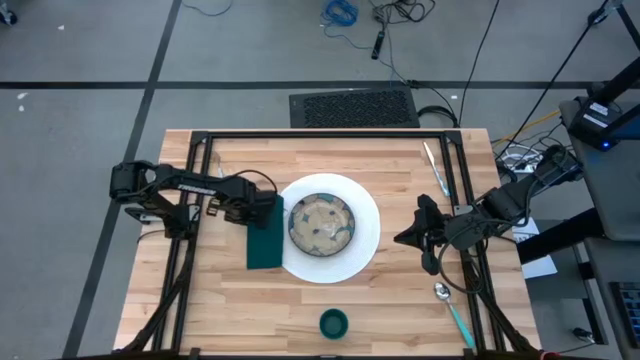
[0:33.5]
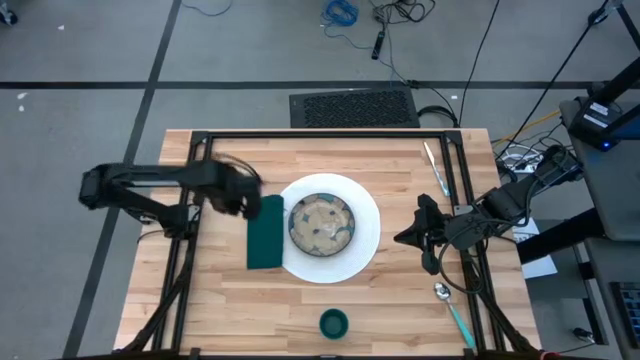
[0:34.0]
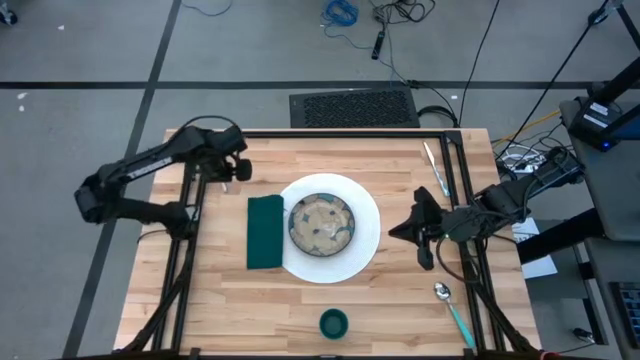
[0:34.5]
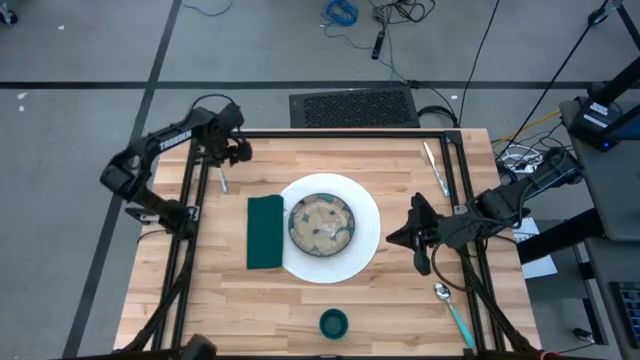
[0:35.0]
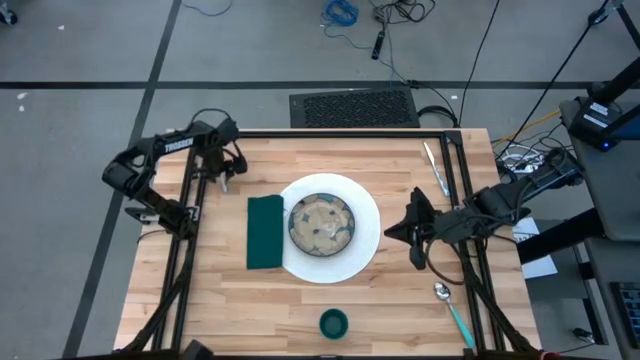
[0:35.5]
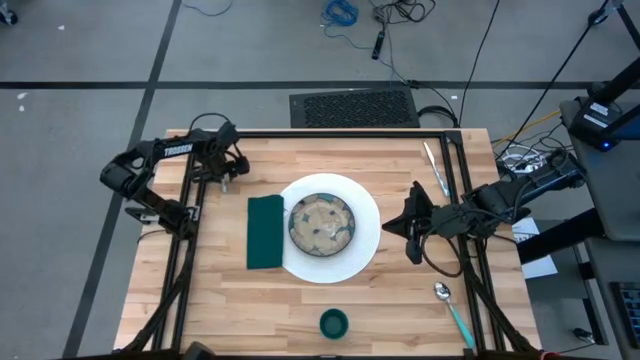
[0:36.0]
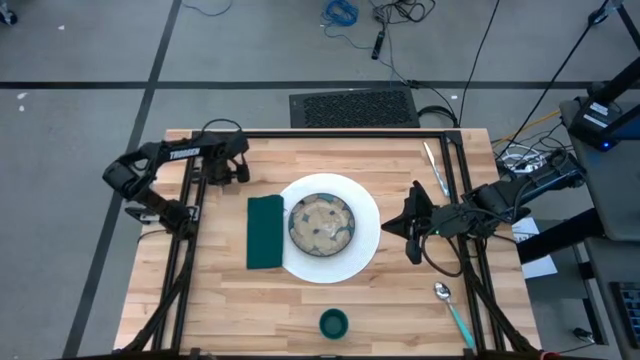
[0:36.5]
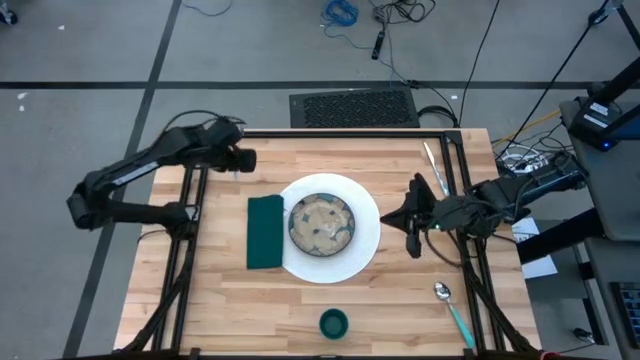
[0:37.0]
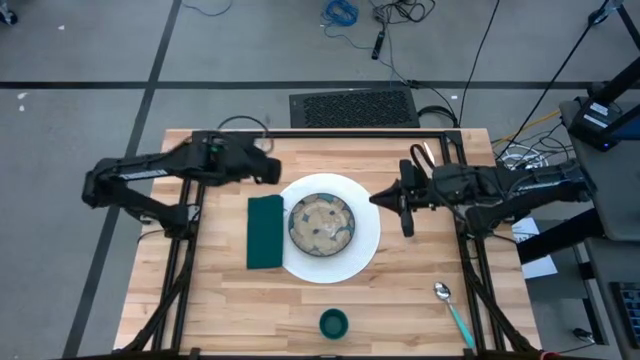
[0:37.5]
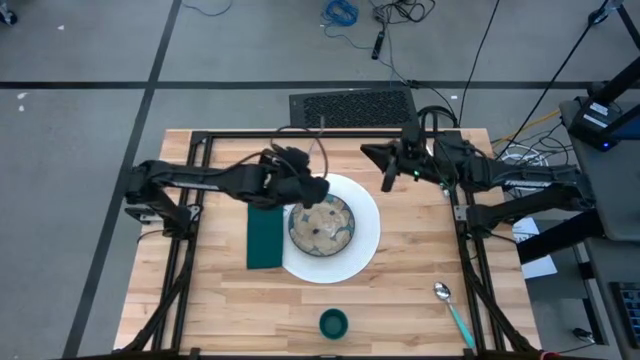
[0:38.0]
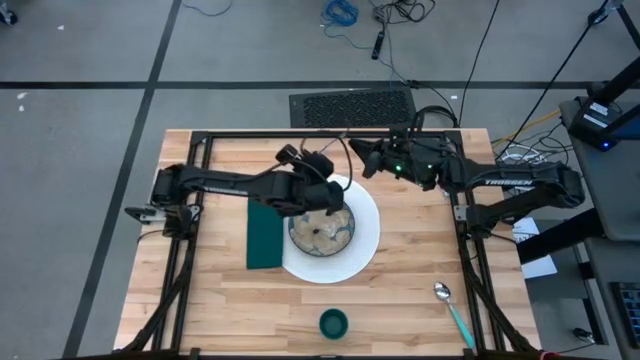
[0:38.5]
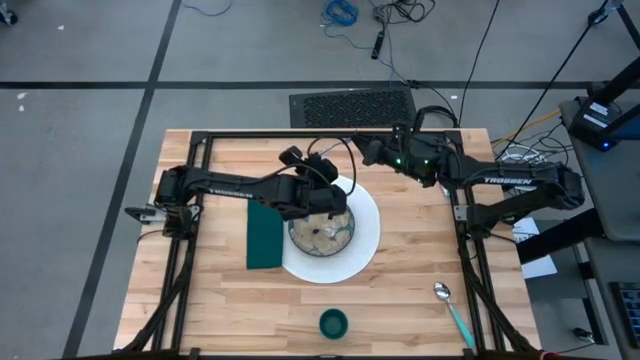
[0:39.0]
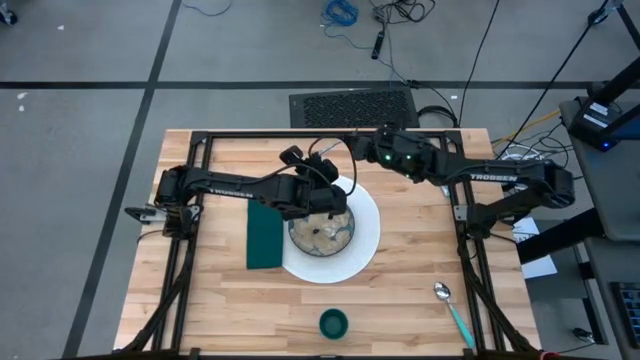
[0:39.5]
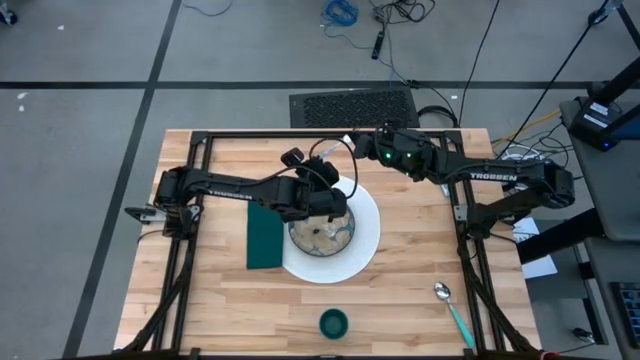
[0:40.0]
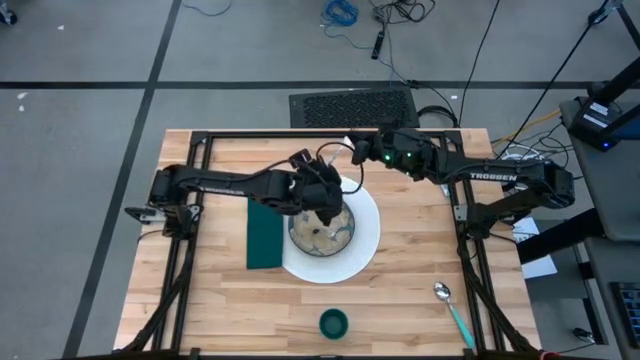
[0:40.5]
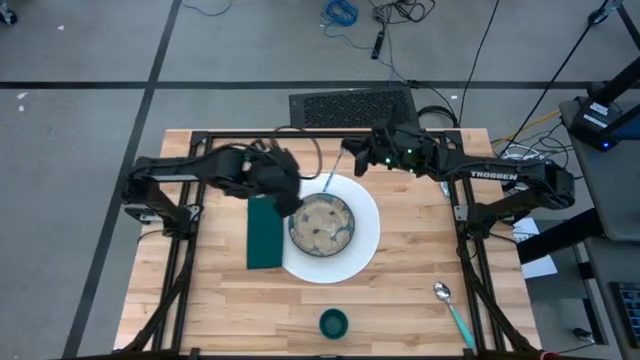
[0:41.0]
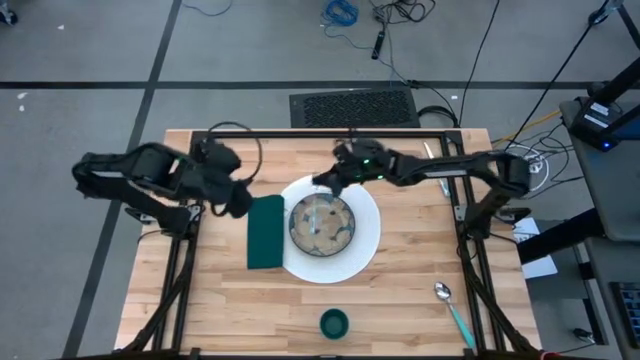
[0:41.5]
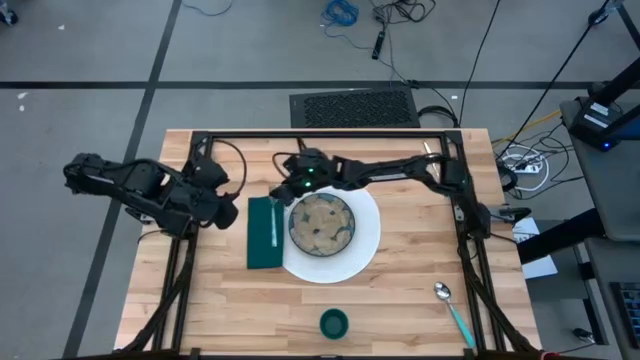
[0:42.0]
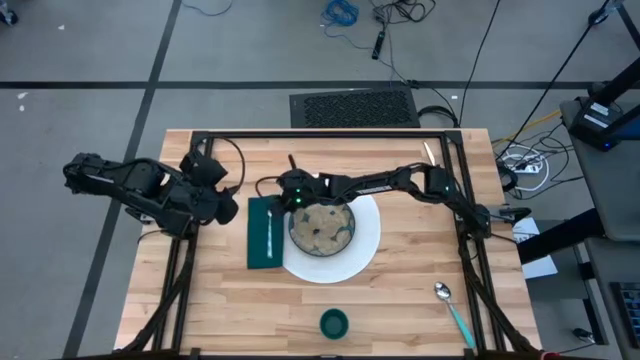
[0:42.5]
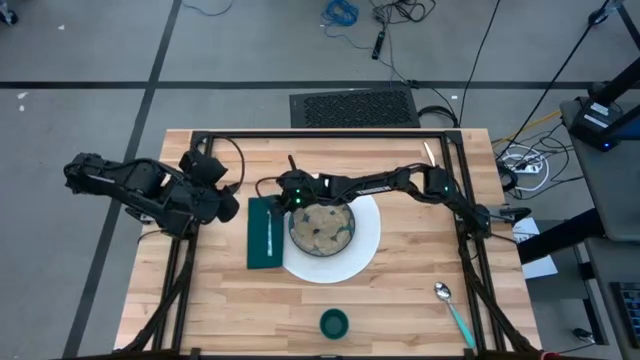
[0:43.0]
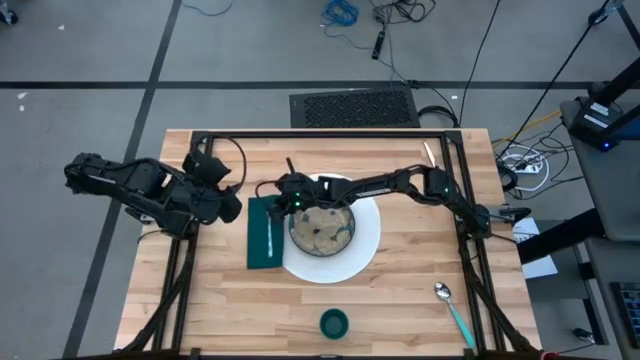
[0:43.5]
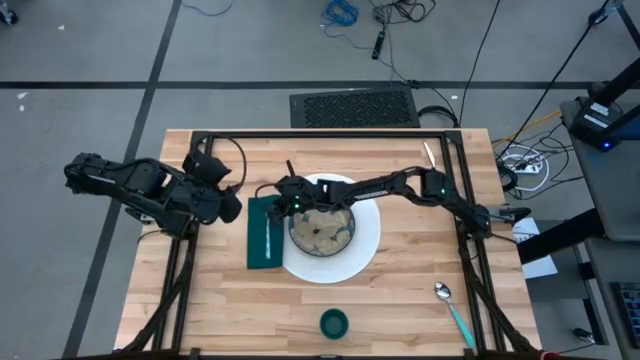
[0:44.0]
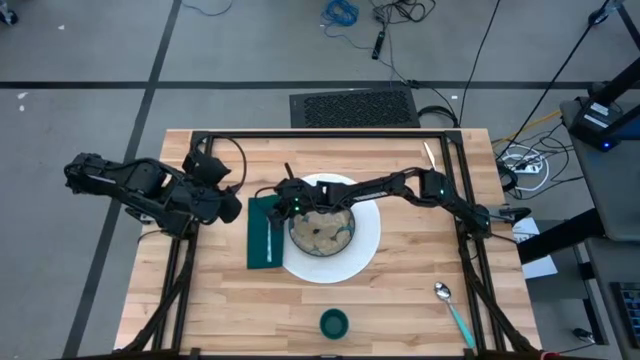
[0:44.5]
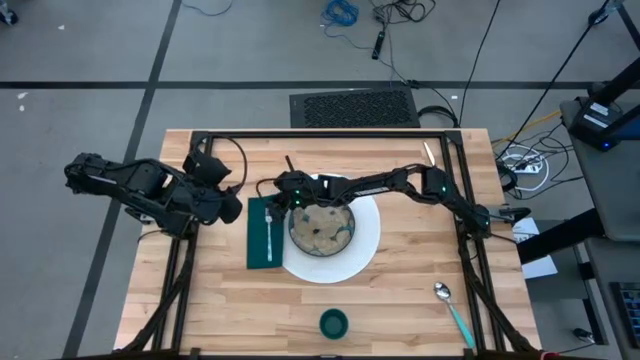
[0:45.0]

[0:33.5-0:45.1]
Task: Set table place
Put the green fork on the napkin

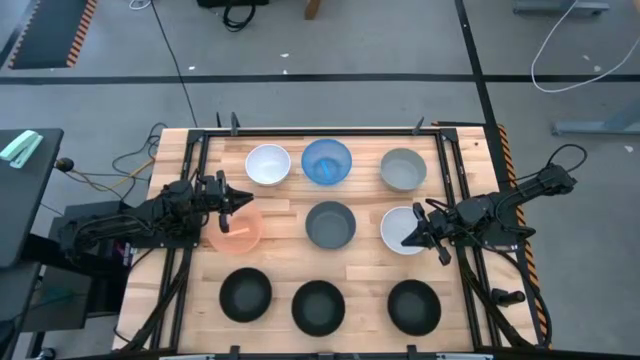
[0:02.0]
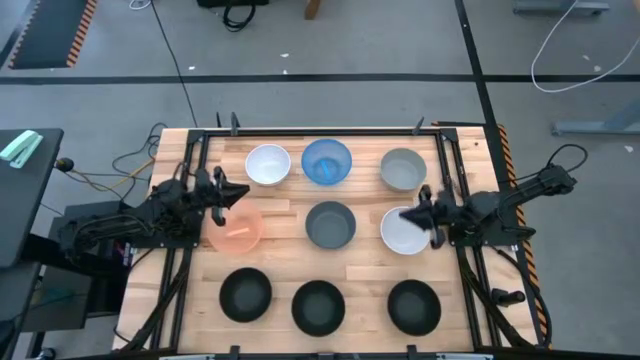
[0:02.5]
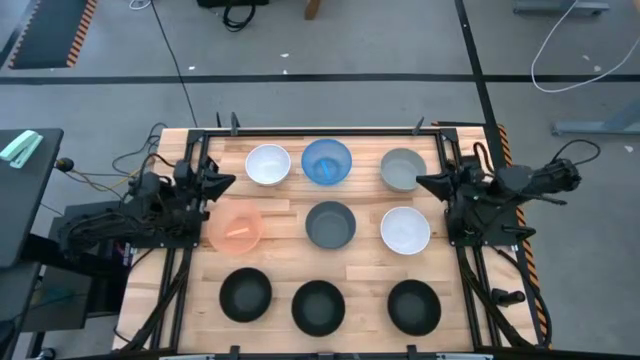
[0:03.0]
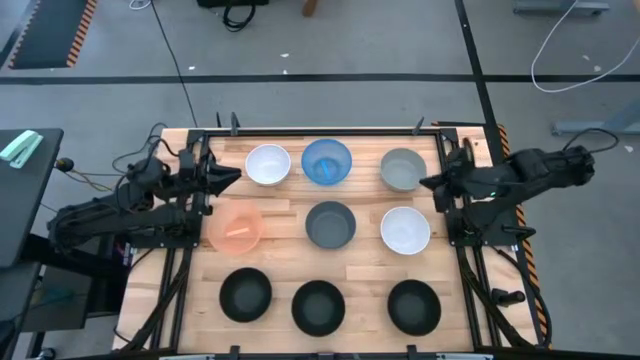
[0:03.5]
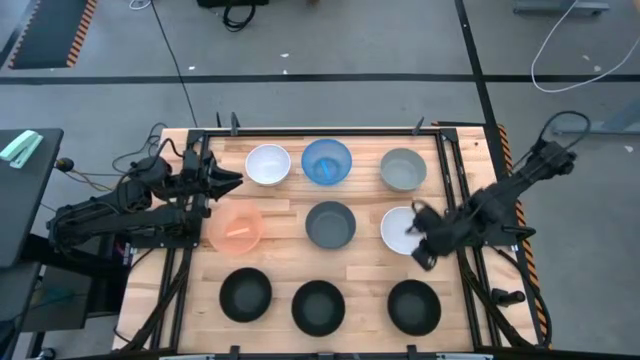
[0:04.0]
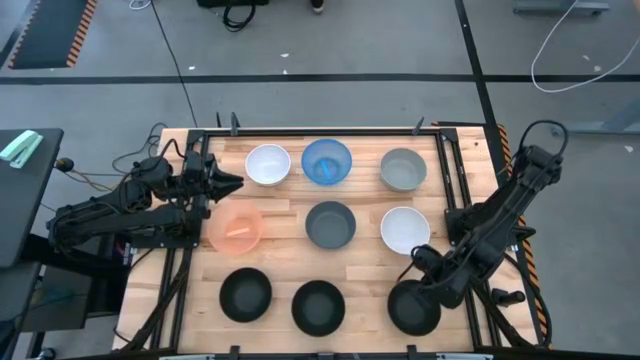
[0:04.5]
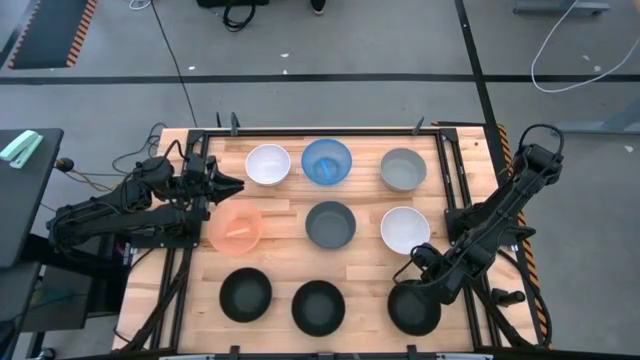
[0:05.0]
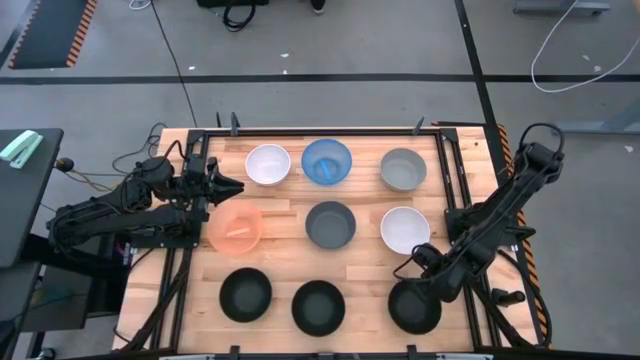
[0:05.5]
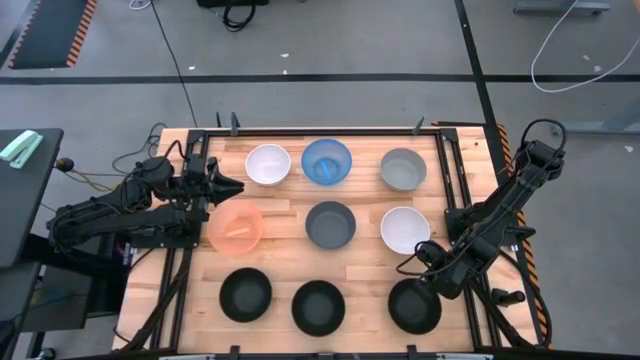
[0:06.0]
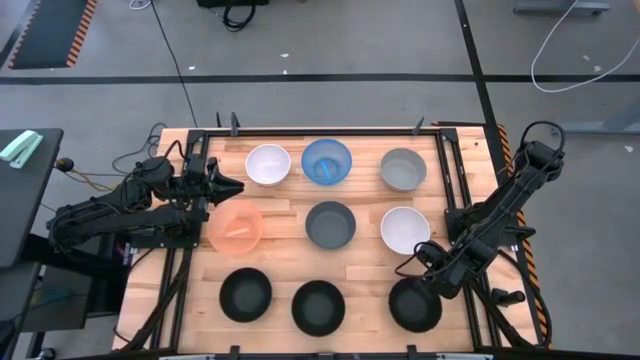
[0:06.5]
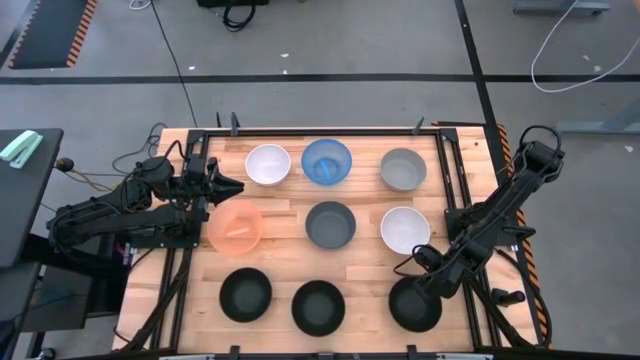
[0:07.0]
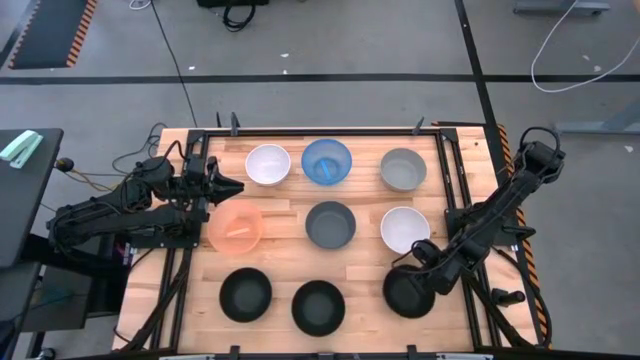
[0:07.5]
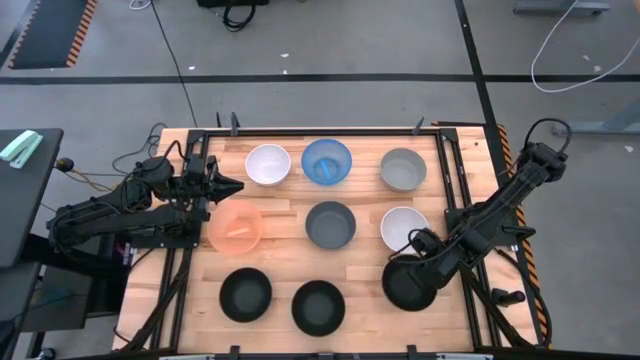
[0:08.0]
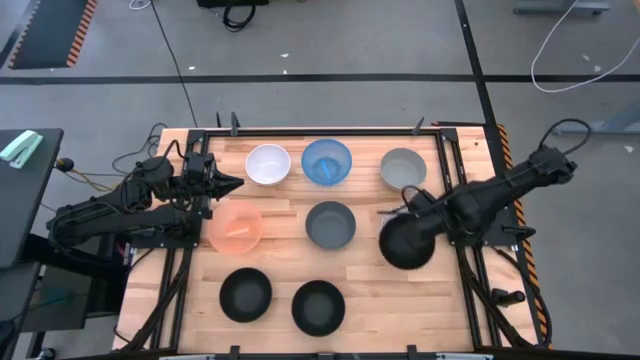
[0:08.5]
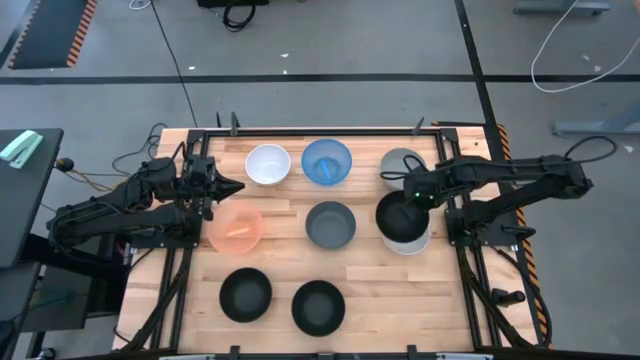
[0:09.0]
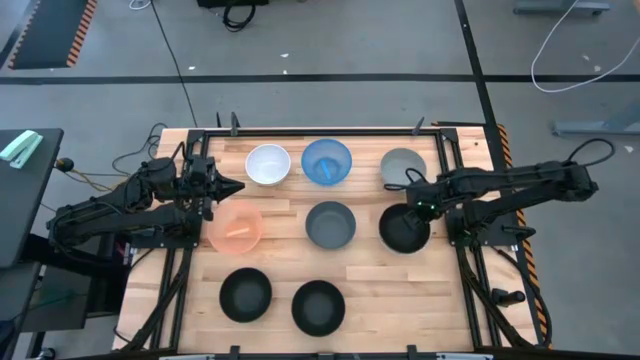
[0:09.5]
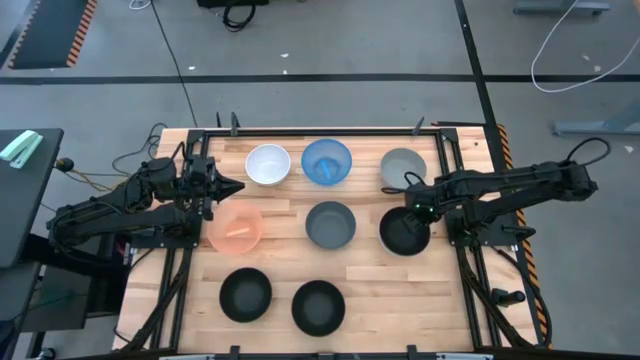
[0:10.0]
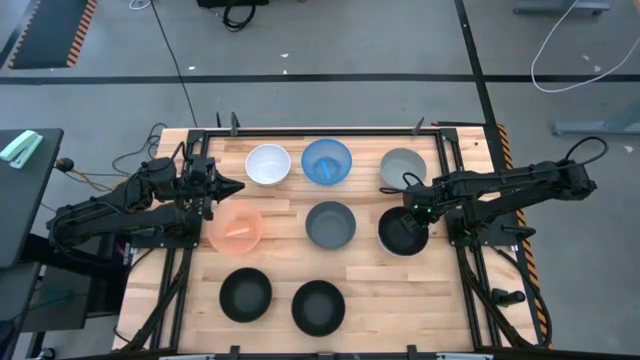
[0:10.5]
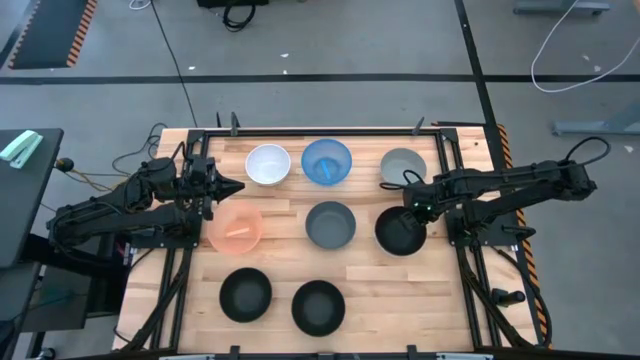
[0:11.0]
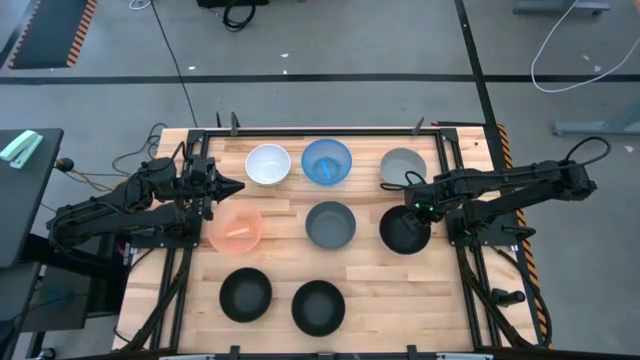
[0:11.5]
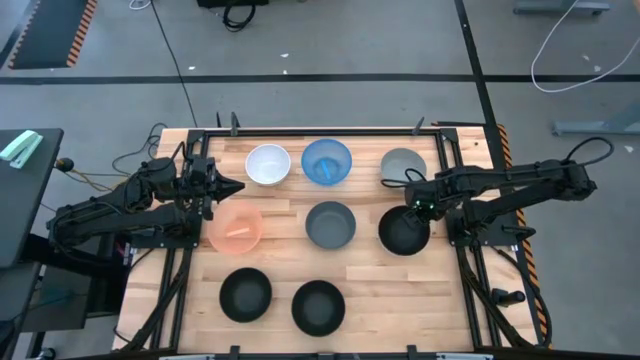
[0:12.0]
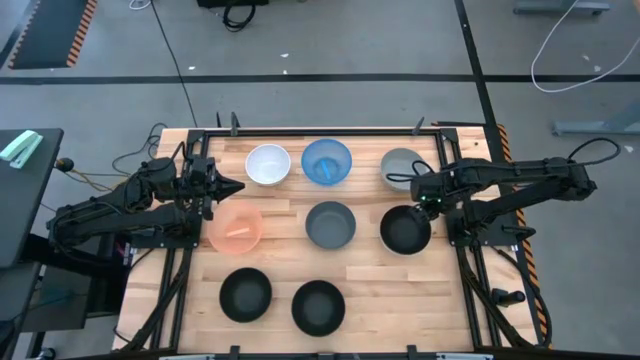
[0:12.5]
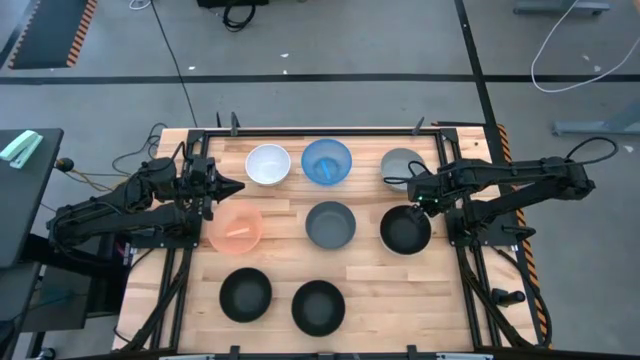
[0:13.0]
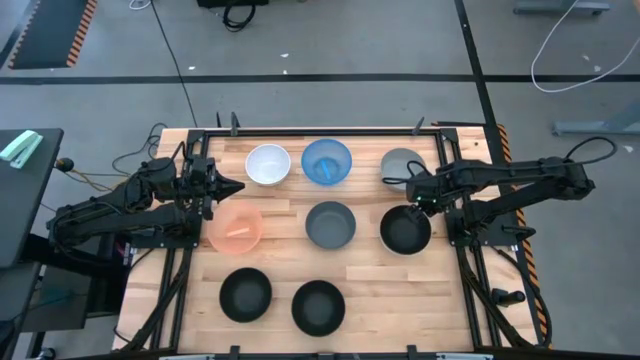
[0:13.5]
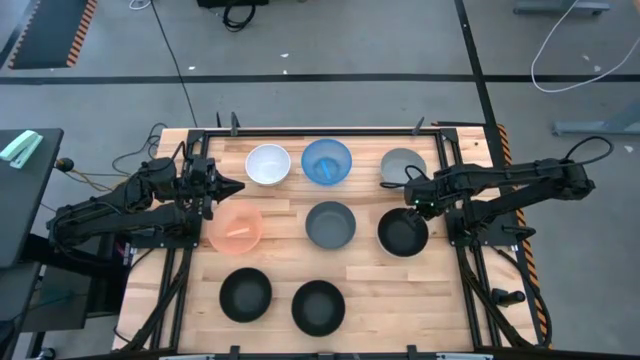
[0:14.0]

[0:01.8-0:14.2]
Task: Nest bowls inside each other
Stack the right black bowl on top of the bottom white bowl
